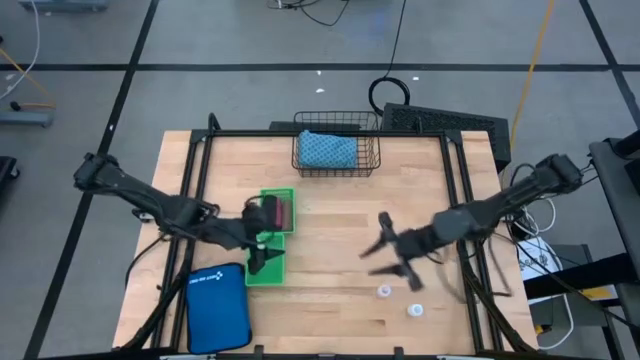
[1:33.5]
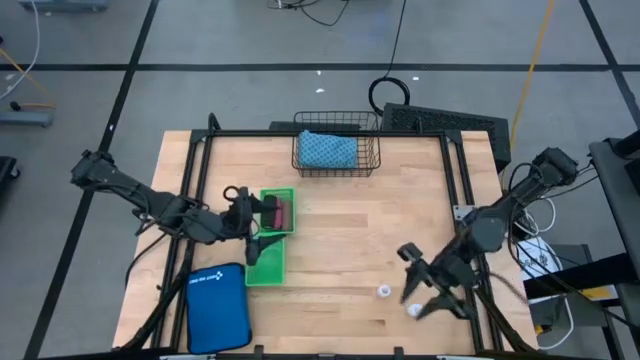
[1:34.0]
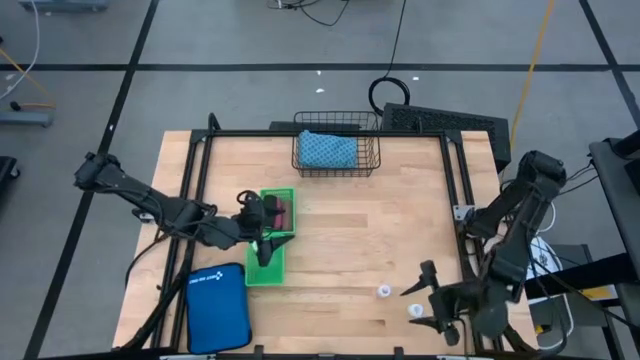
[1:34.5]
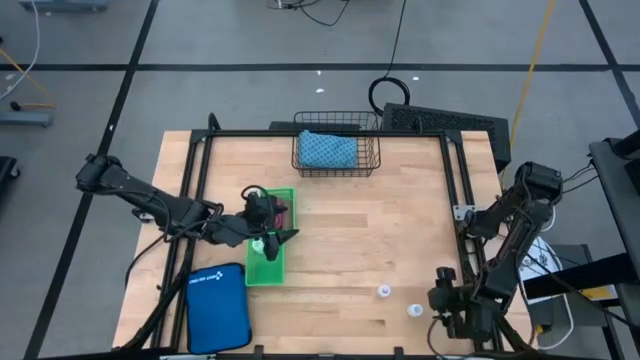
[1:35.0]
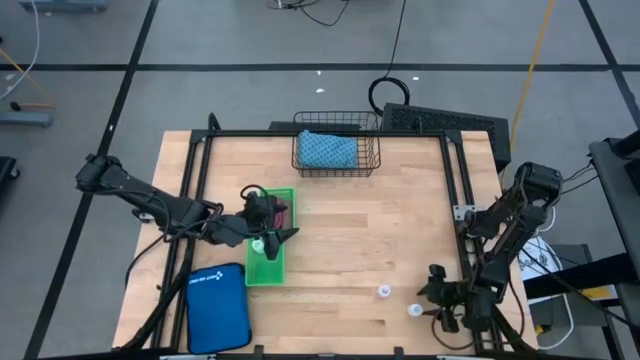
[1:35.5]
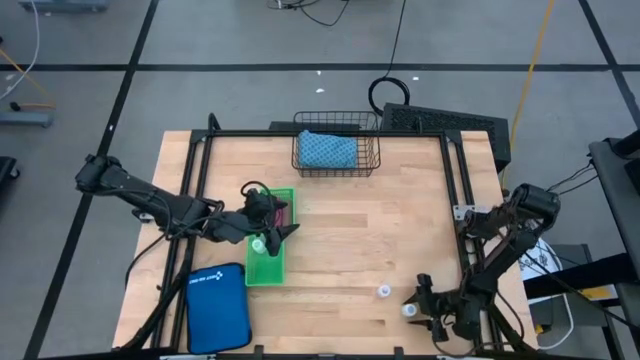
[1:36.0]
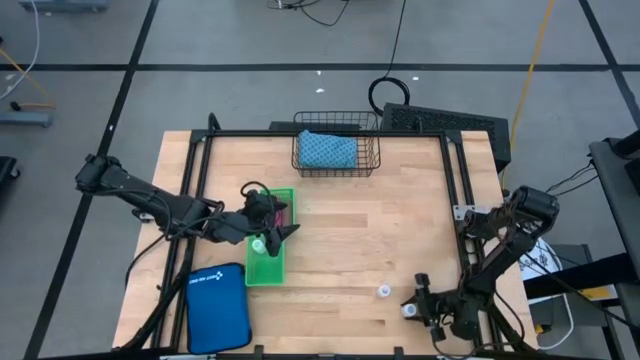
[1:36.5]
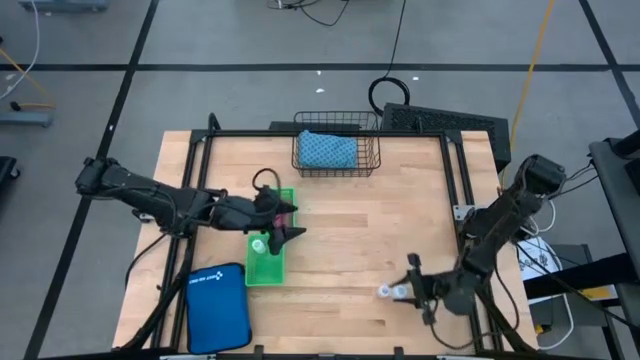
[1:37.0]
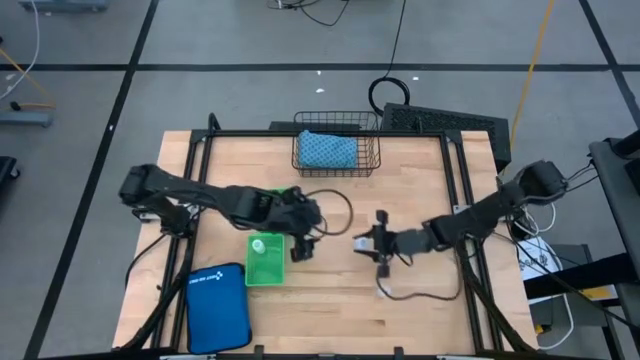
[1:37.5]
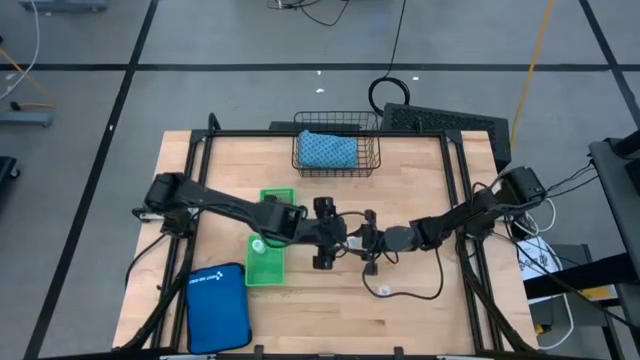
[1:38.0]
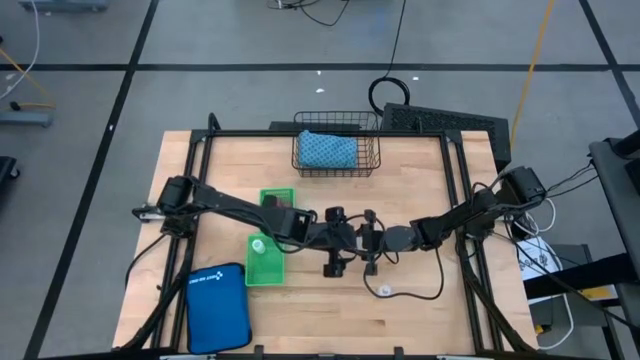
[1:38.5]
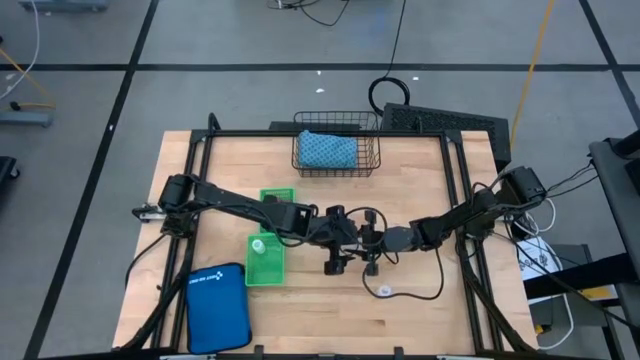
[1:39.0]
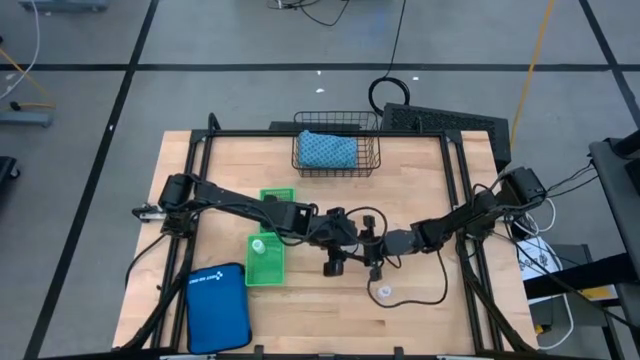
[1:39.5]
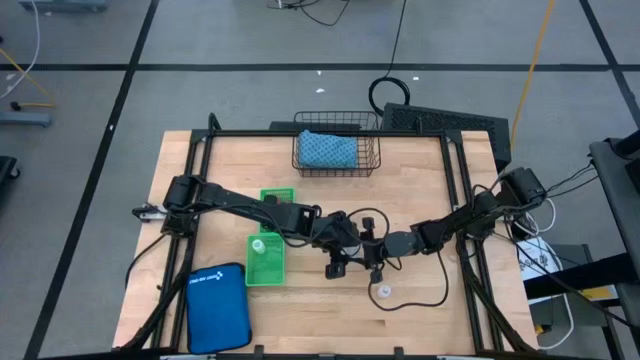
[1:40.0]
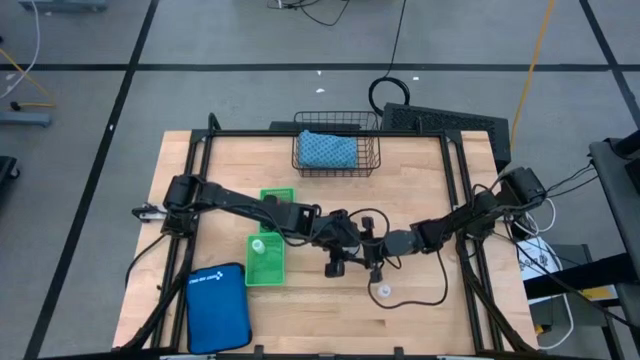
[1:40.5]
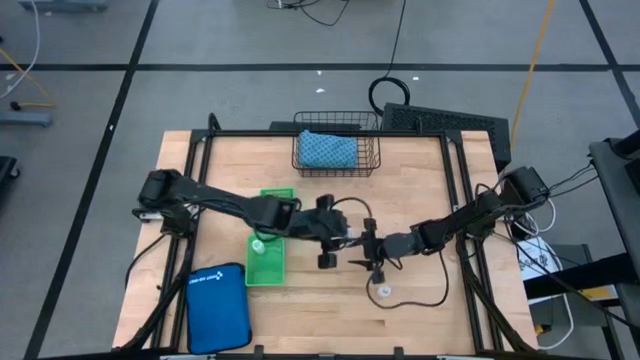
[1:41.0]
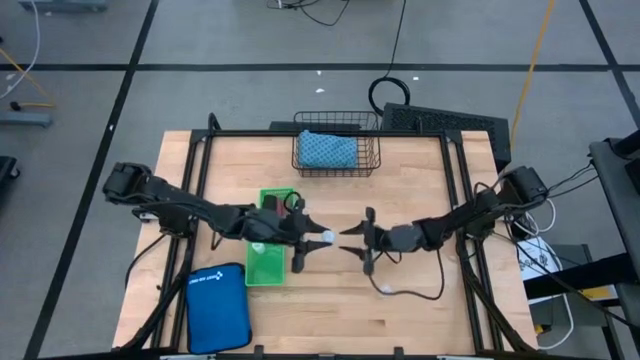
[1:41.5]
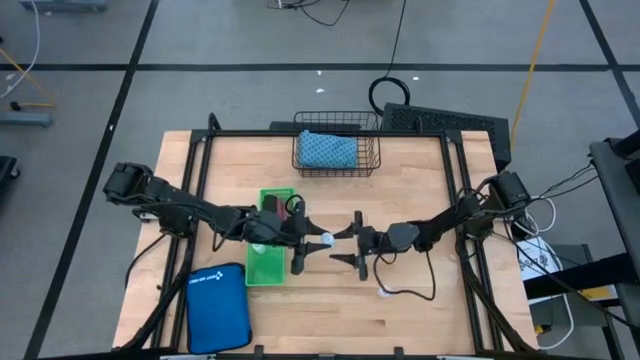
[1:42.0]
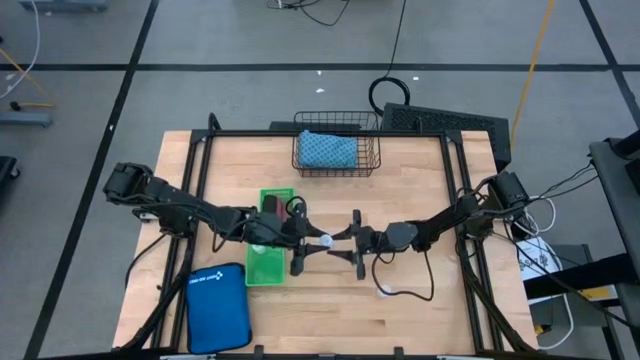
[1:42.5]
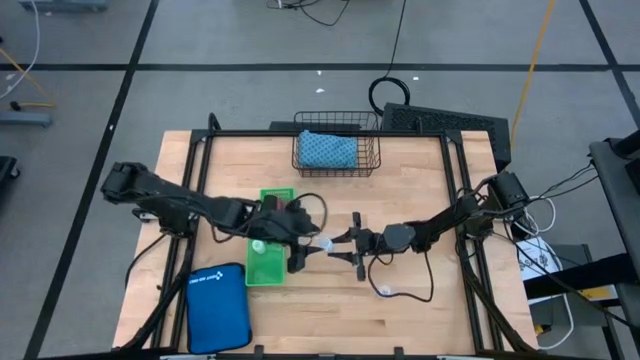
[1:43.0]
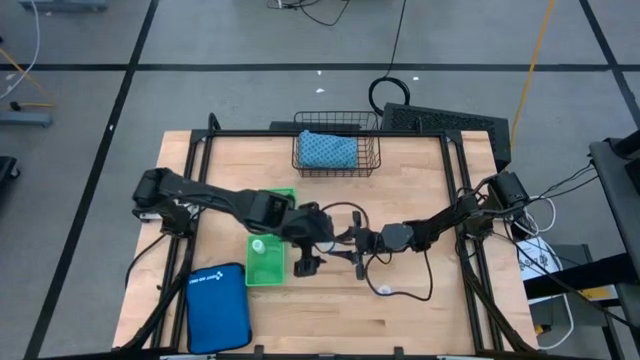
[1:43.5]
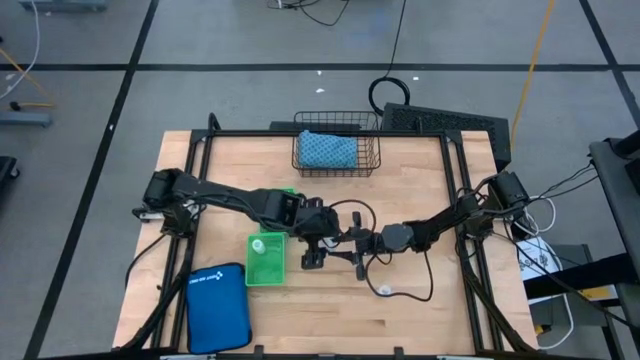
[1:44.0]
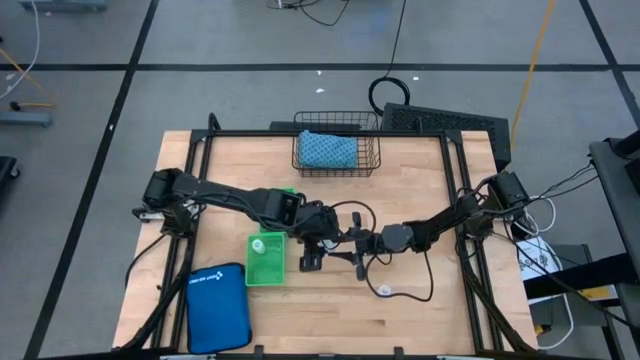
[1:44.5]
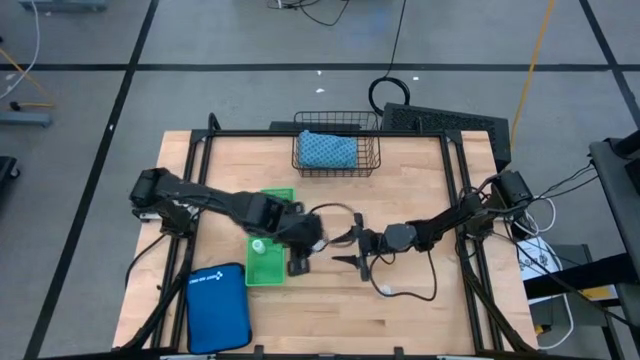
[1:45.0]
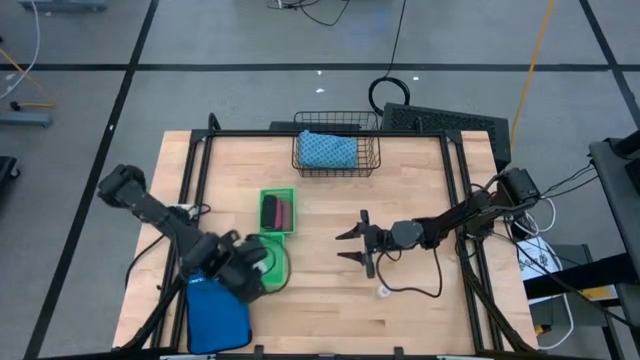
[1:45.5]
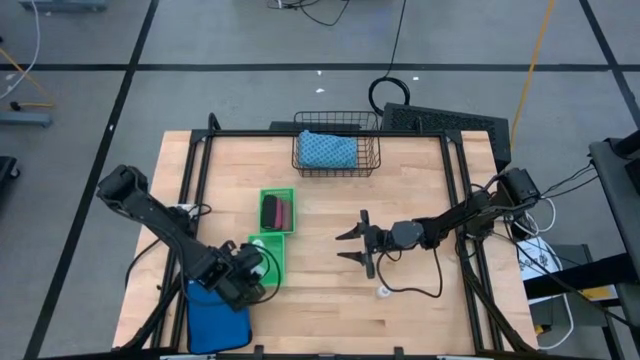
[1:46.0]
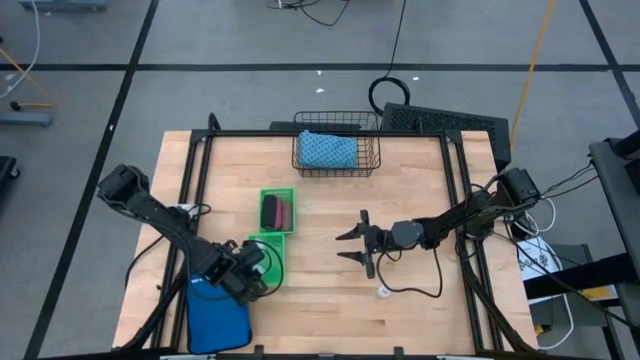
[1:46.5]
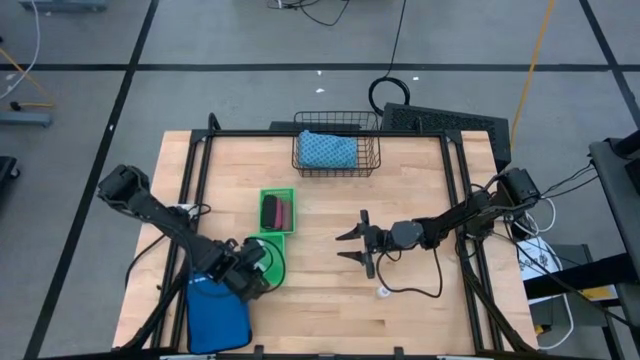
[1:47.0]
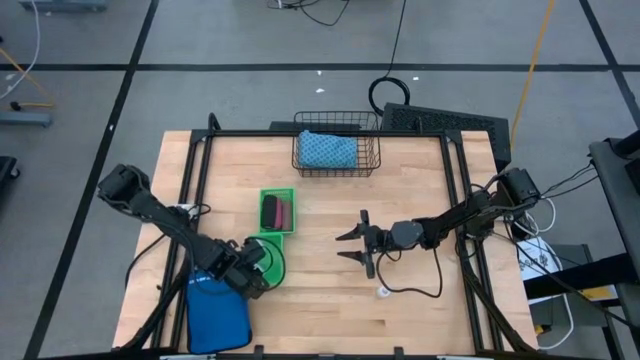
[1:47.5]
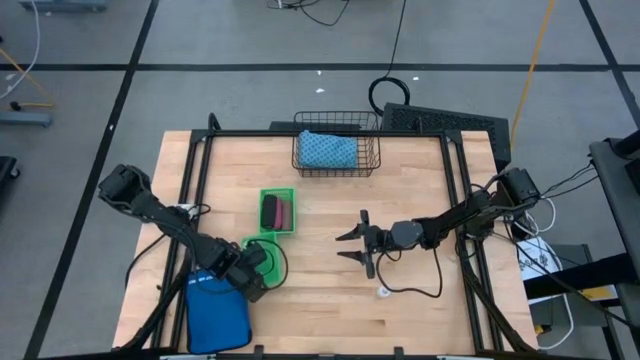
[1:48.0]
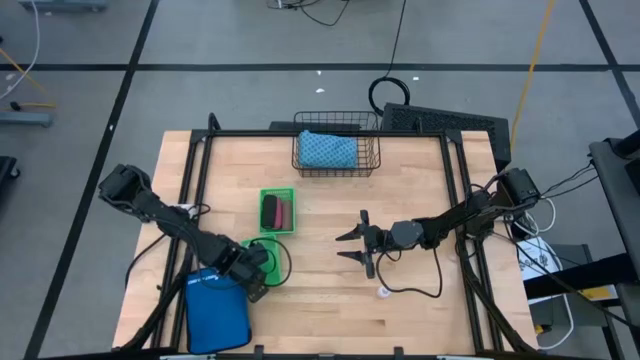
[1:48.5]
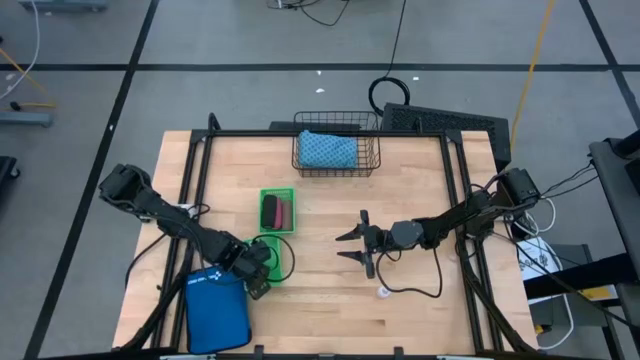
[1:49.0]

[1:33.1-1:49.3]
Task: Pick & Place Medicine items
Put the bottom white pill bottle into the bottom green bin

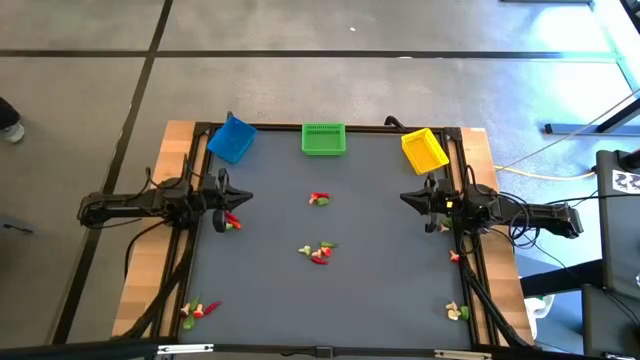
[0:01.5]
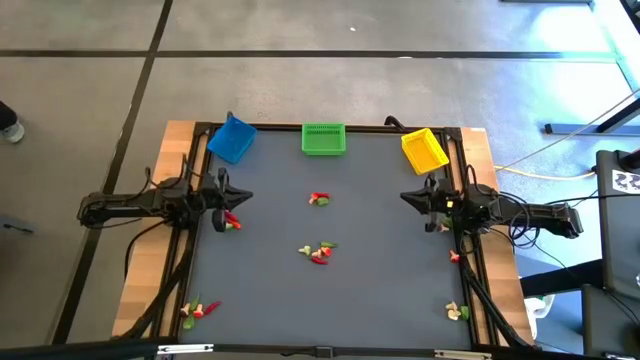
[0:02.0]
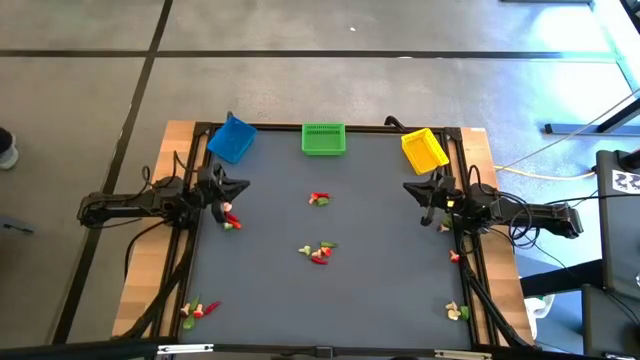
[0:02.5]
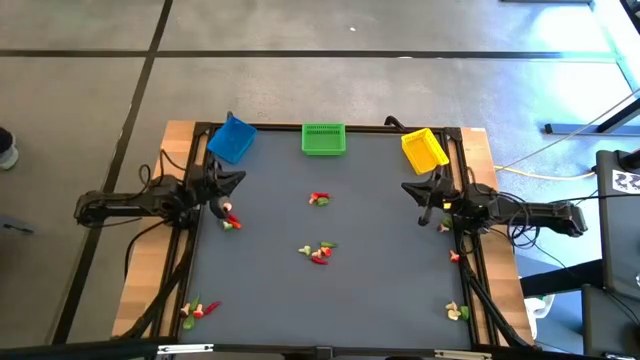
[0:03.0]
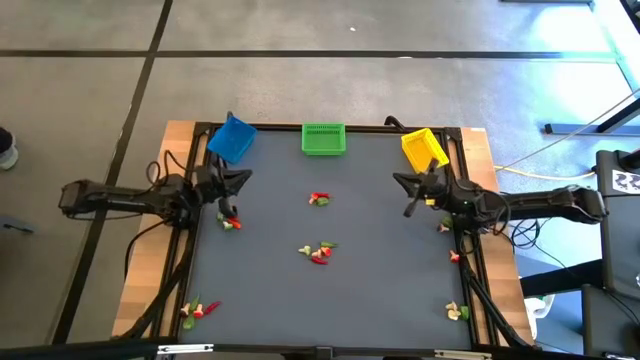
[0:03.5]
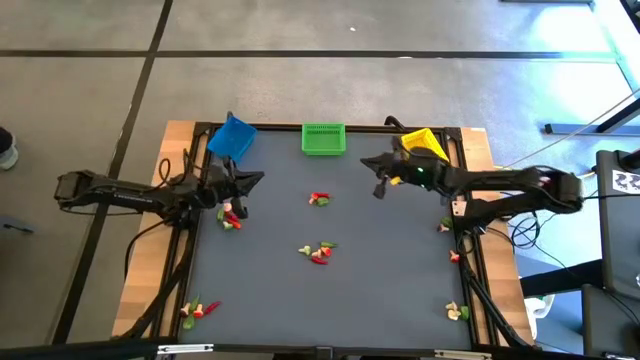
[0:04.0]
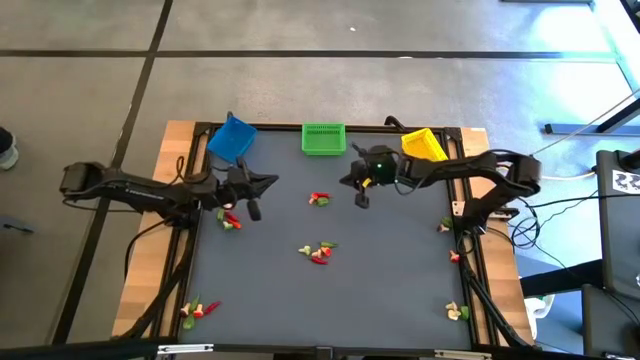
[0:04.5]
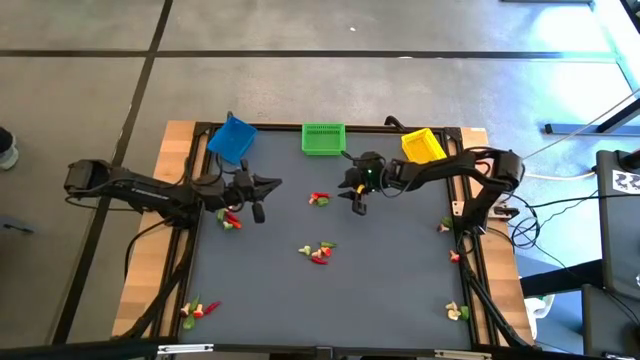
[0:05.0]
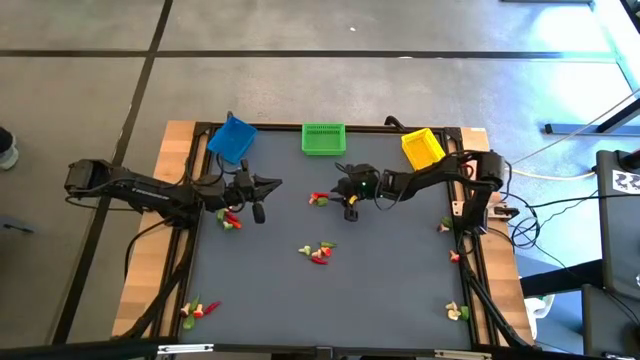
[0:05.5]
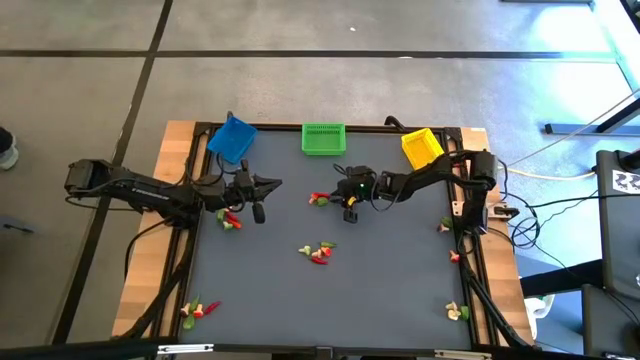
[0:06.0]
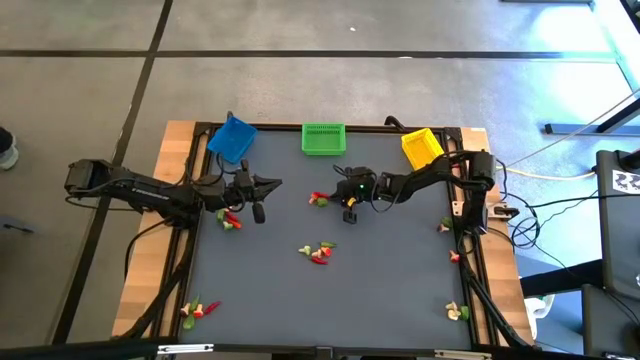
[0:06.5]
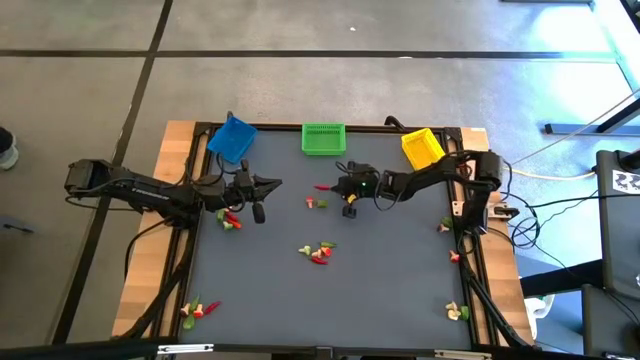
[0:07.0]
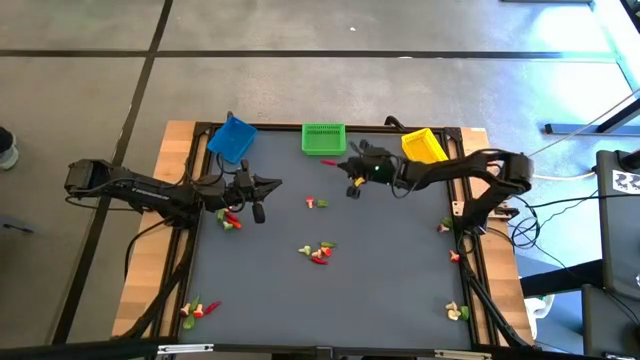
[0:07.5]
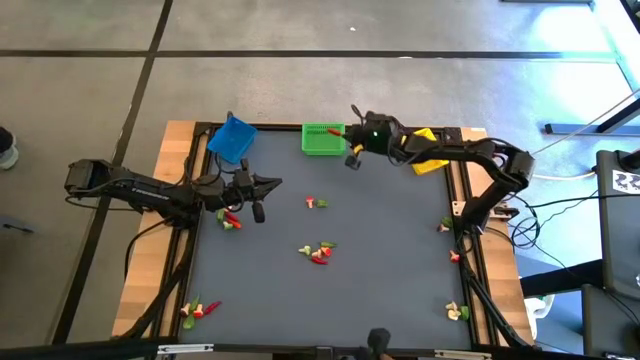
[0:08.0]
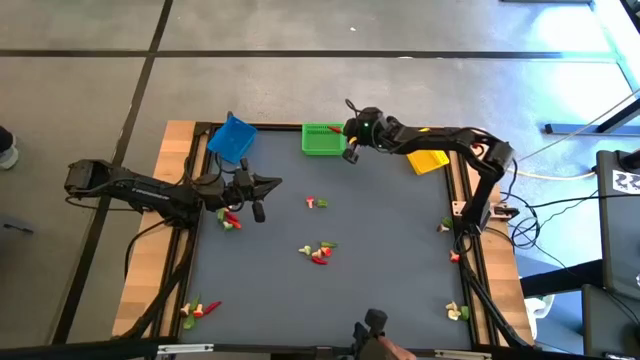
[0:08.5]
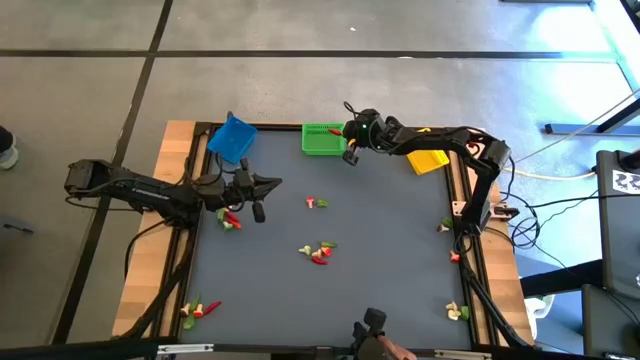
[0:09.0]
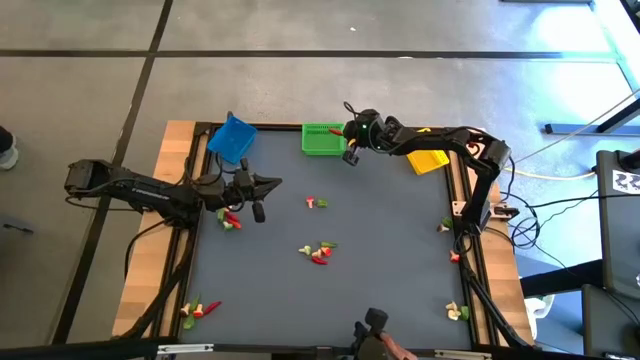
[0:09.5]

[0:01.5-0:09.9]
Task: Sort produce into baskets
Put the red chili pepper into the green bin
